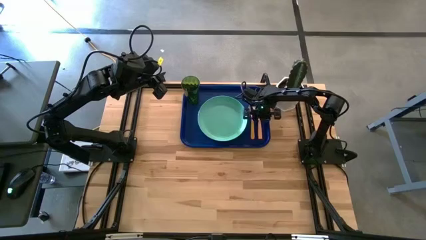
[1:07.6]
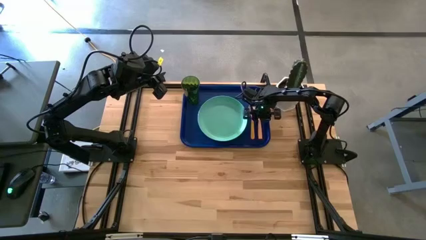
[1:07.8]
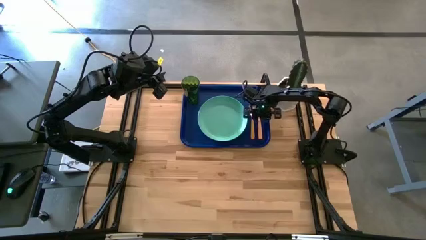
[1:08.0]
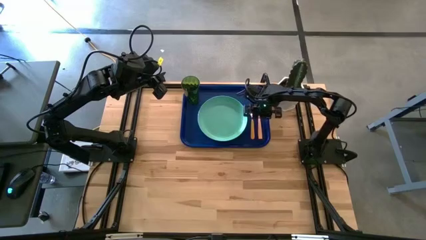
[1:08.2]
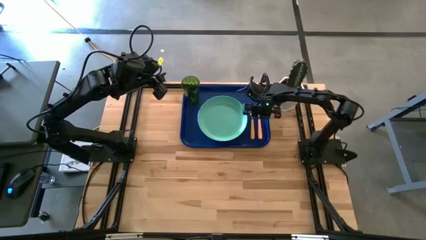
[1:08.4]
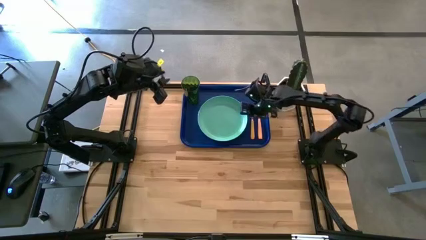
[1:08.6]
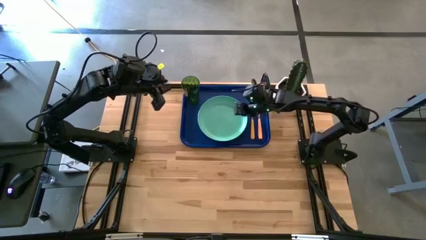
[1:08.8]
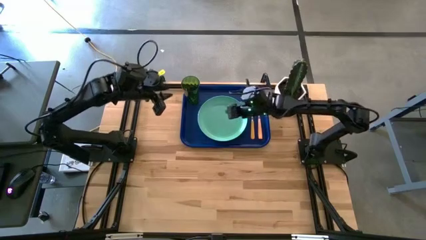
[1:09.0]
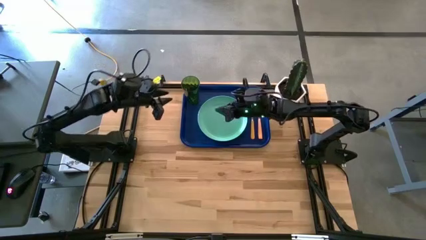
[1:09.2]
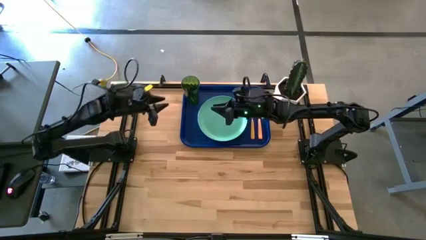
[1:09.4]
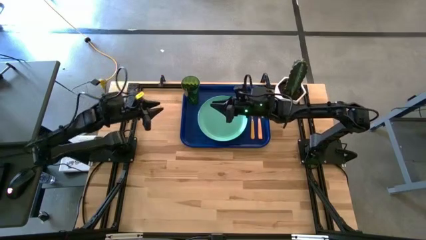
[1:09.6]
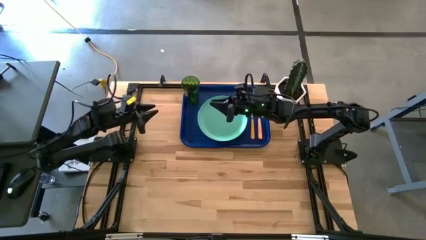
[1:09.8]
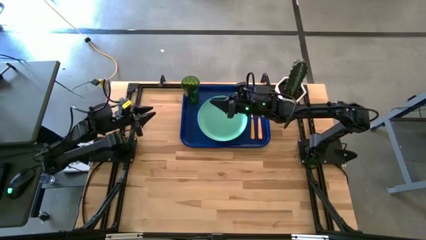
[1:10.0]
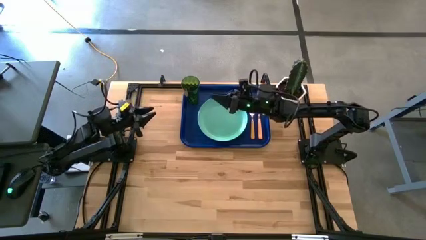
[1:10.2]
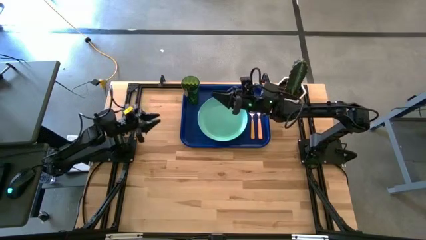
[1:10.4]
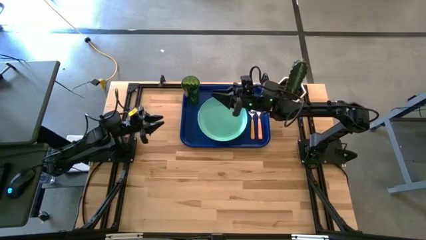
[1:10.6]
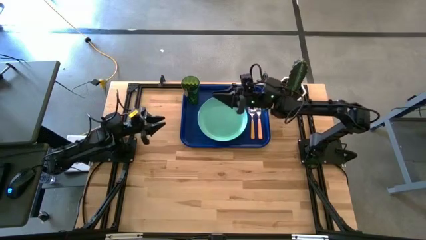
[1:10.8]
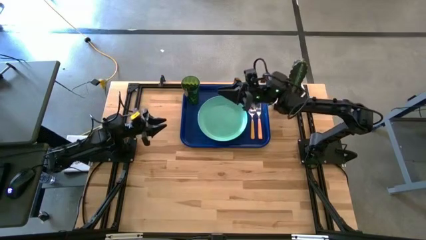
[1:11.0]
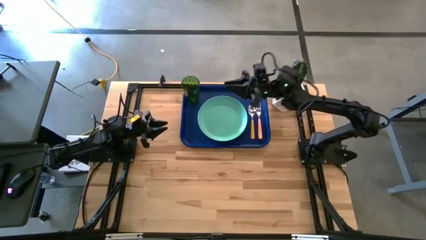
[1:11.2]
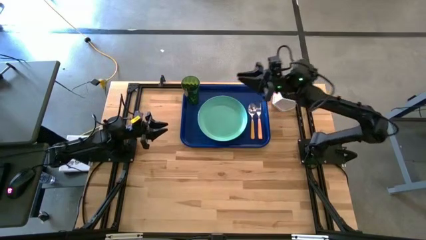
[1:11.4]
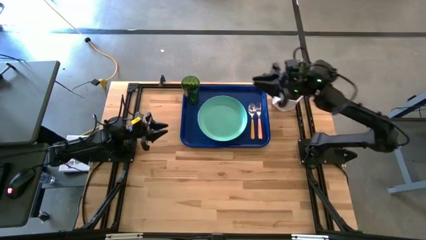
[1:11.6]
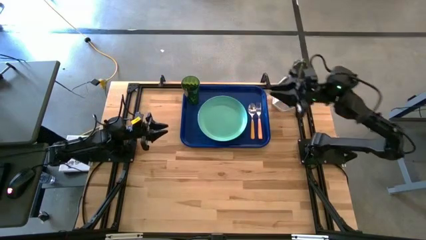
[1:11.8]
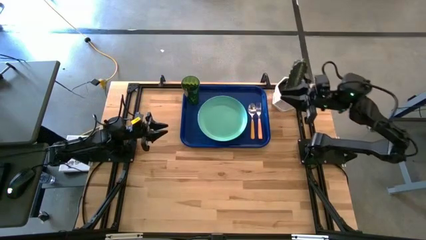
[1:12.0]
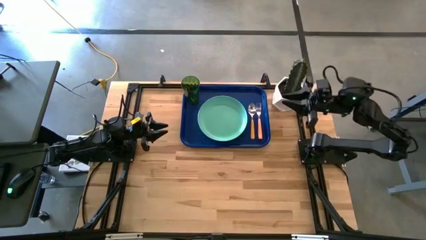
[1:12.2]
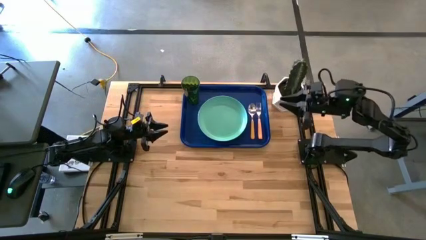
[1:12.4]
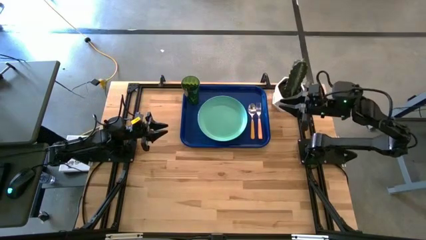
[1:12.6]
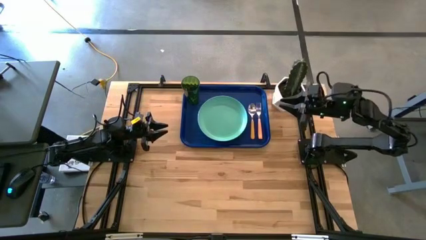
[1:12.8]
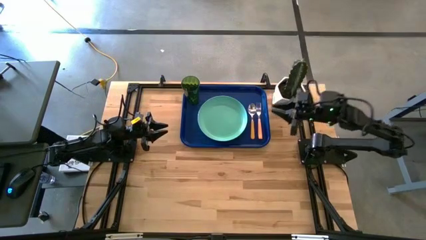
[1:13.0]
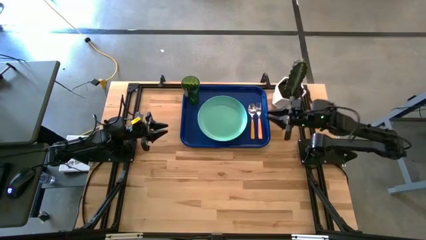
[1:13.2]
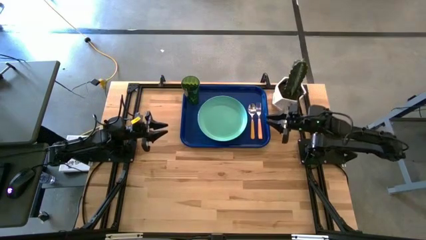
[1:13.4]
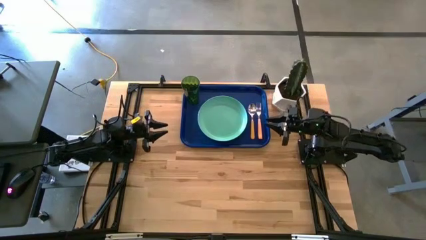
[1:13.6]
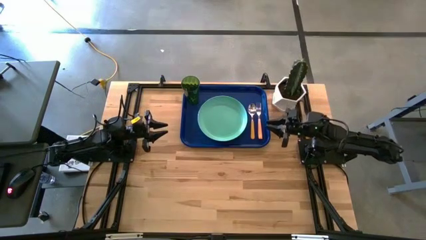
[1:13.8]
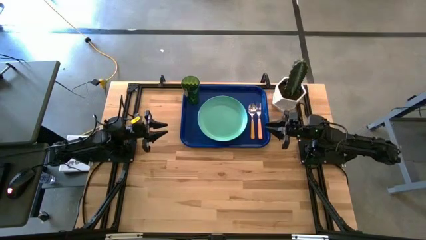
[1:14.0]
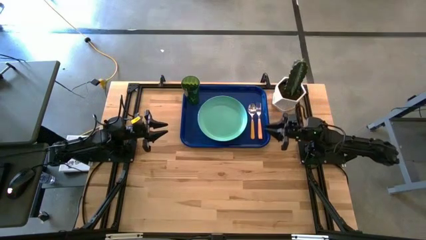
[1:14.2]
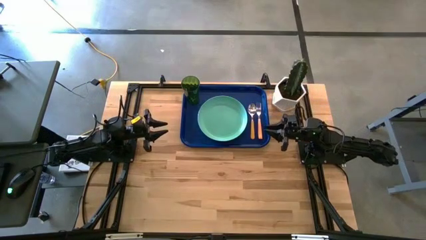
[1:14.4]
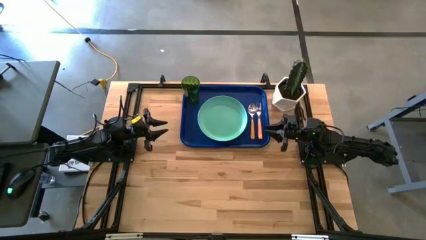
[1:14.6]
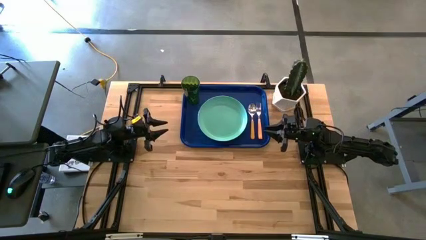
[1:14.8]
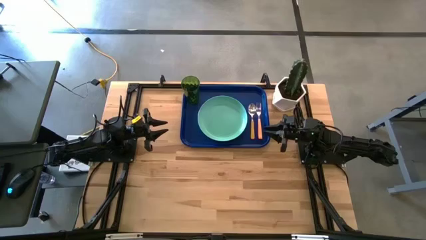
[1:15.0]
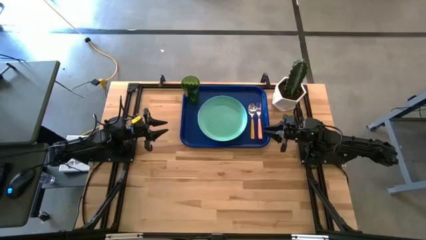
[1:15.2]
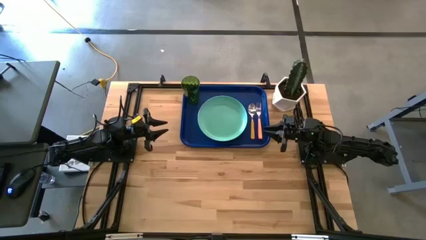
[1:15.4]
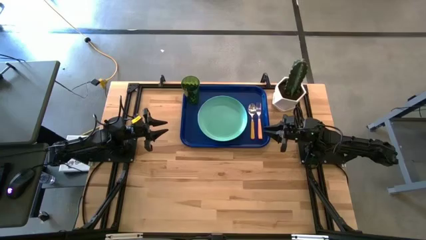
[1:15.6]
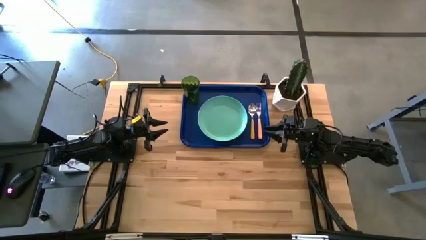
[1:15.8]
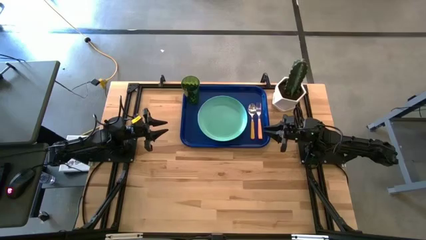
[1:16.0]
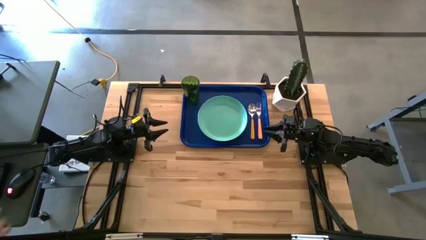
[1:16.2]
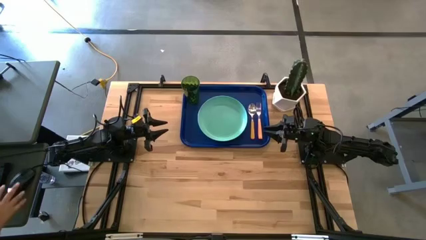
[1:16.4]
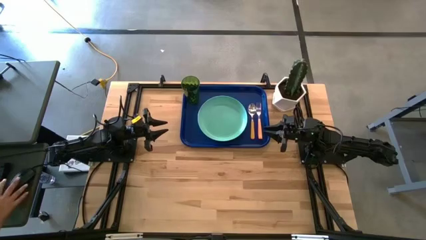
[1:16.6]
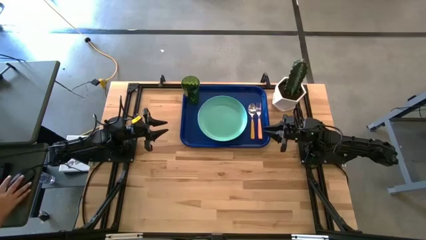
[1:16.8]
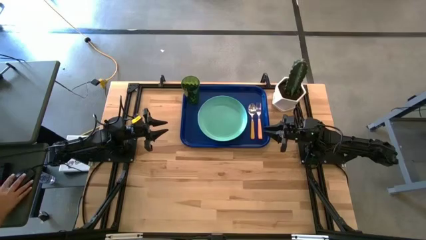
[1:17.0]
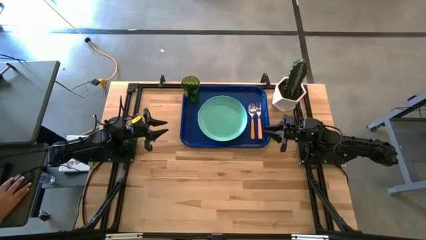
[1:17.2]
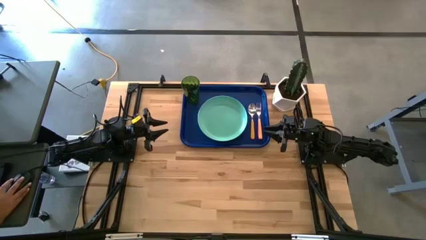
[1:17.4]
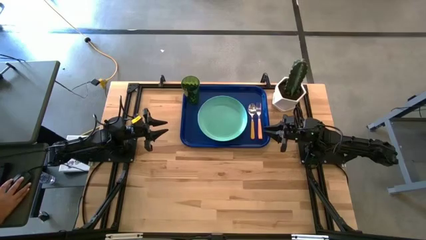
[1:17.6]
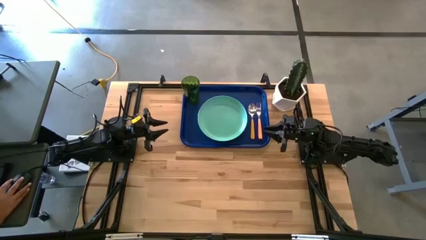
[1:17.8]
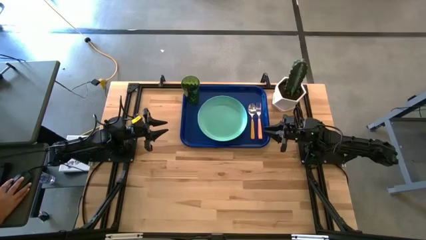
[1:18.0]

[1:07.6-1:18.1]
Task: Pick and place plate/cup/fork/spoon on tray
Return to Home Position
